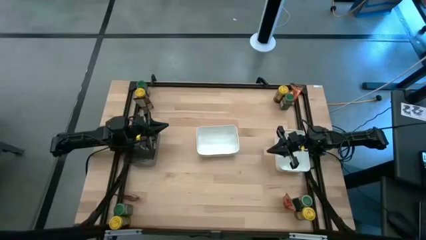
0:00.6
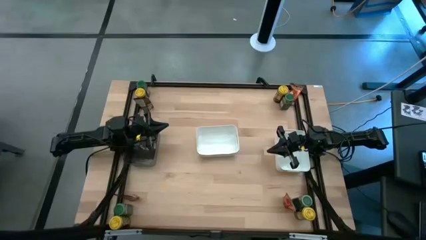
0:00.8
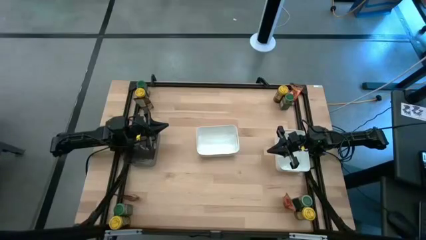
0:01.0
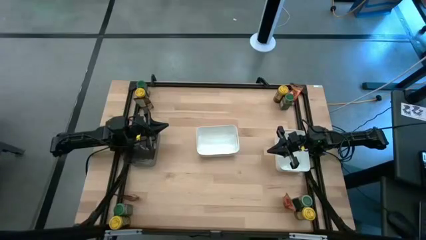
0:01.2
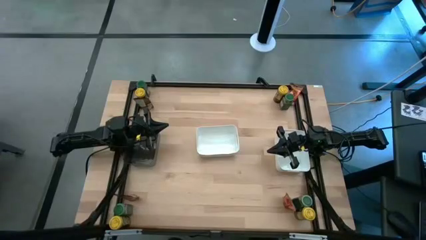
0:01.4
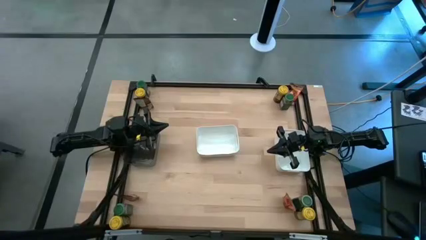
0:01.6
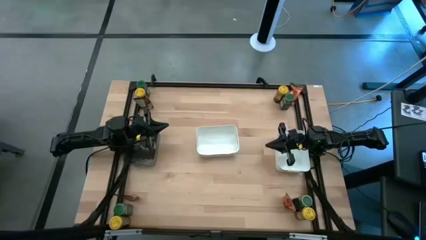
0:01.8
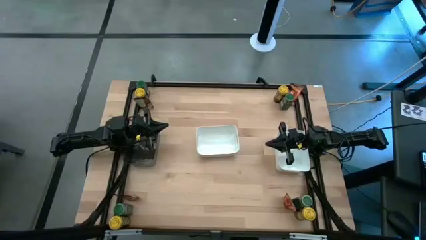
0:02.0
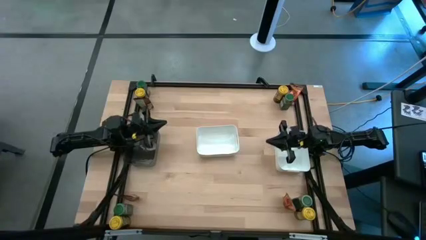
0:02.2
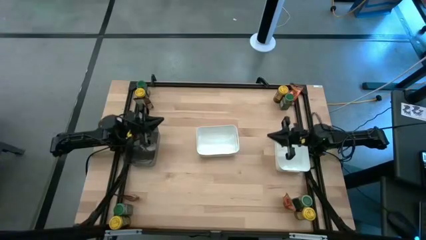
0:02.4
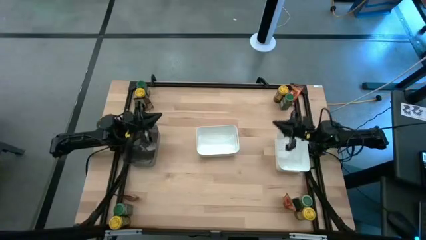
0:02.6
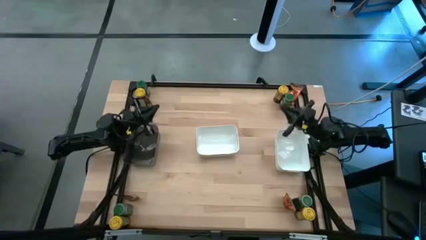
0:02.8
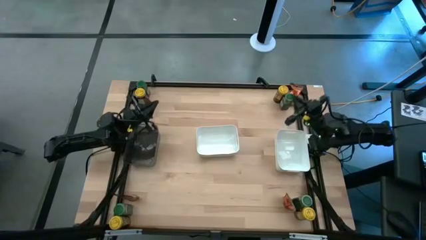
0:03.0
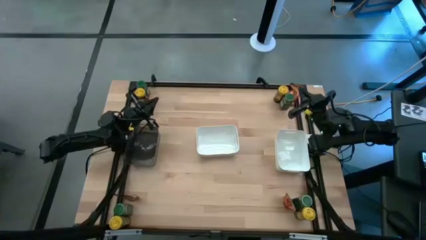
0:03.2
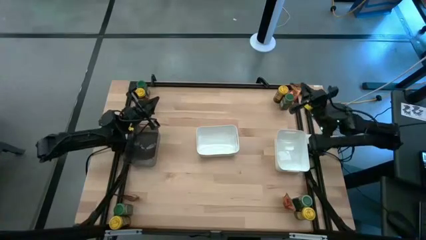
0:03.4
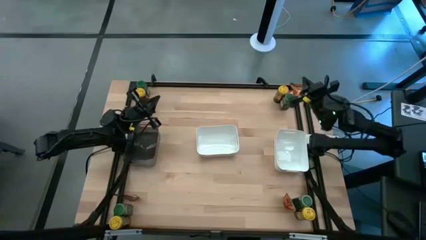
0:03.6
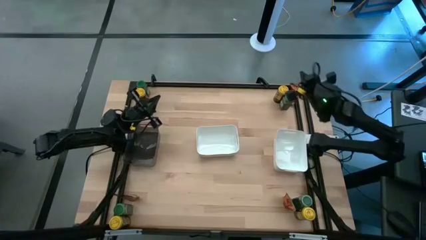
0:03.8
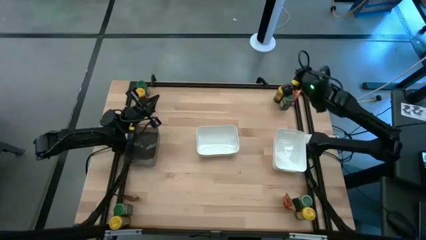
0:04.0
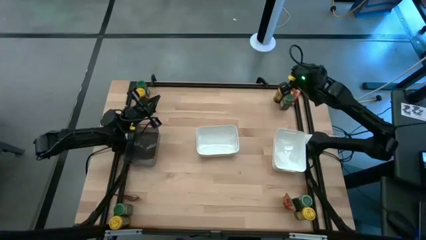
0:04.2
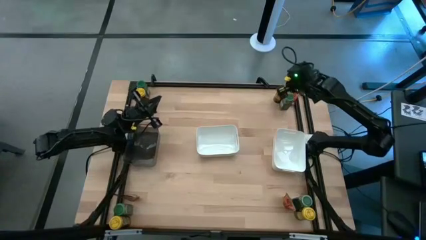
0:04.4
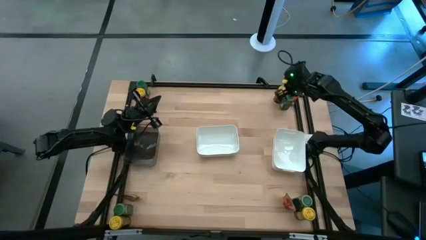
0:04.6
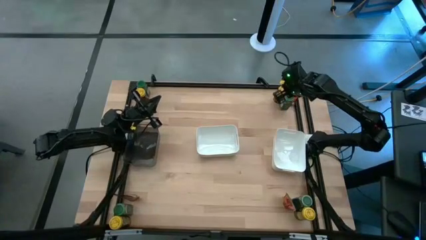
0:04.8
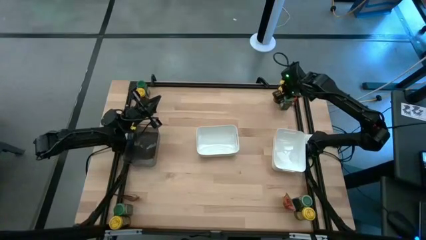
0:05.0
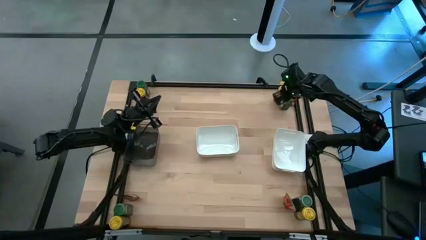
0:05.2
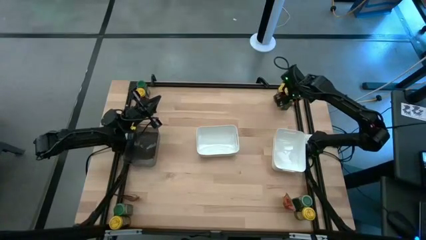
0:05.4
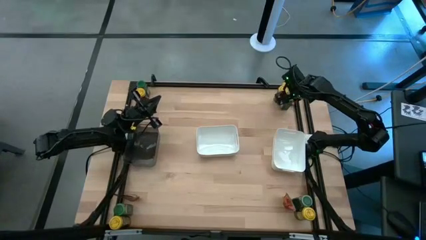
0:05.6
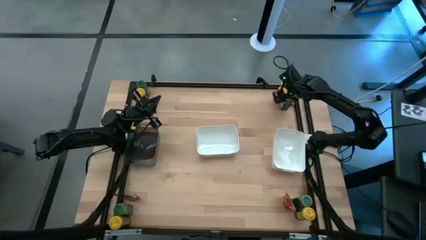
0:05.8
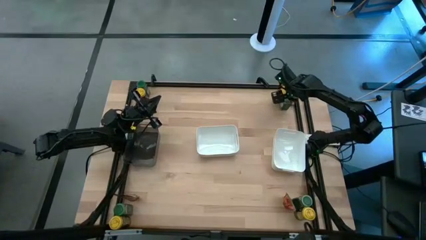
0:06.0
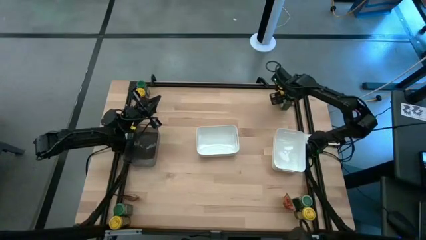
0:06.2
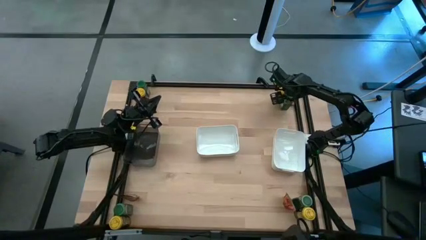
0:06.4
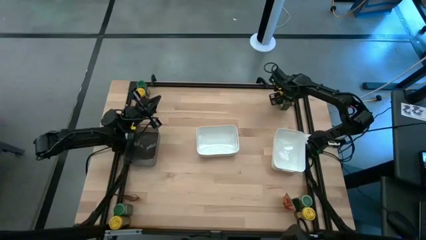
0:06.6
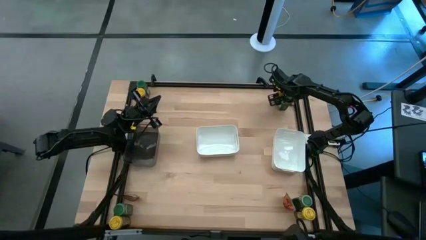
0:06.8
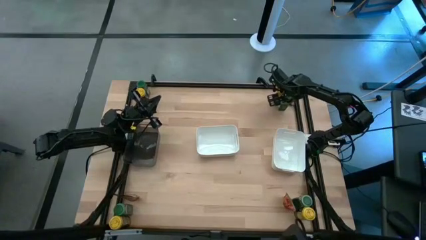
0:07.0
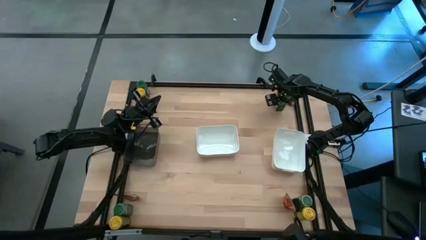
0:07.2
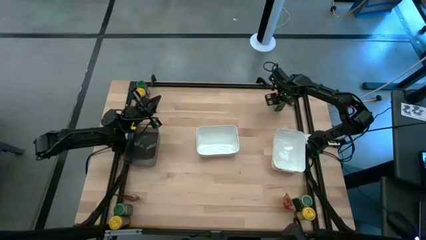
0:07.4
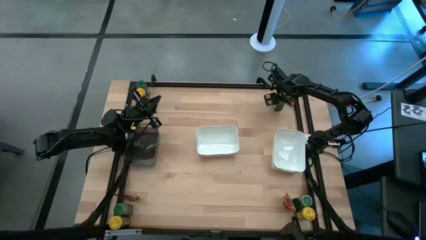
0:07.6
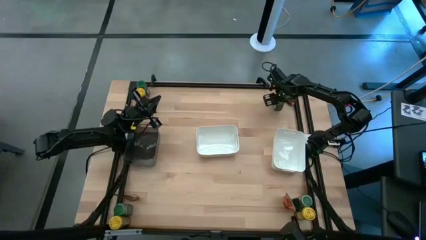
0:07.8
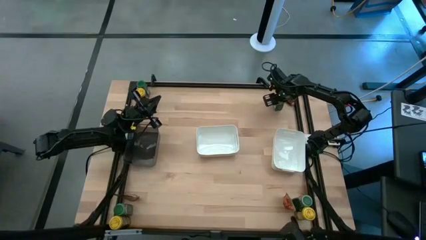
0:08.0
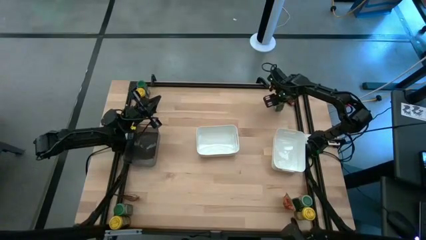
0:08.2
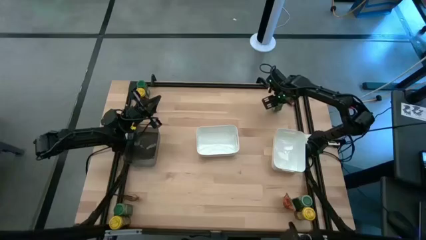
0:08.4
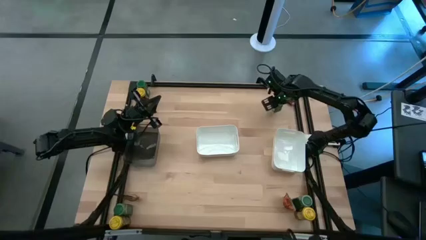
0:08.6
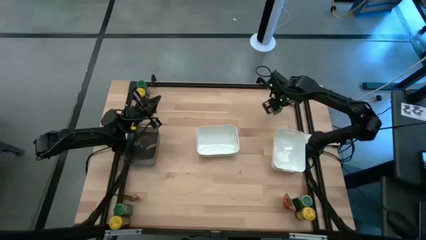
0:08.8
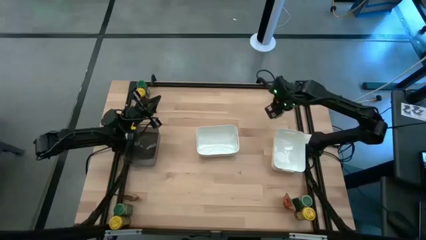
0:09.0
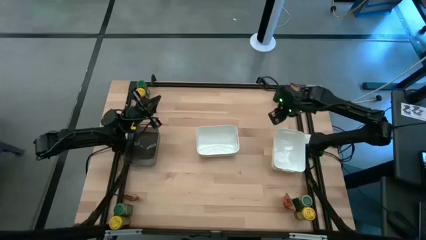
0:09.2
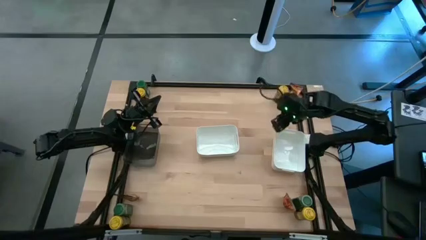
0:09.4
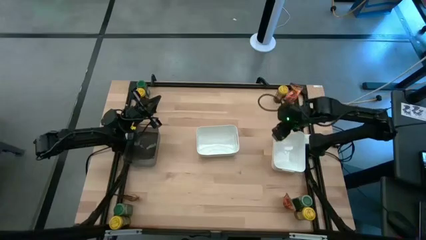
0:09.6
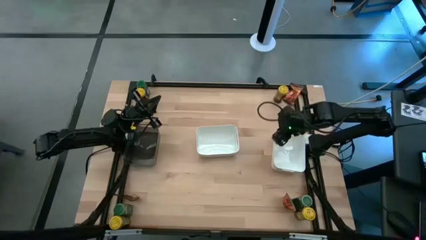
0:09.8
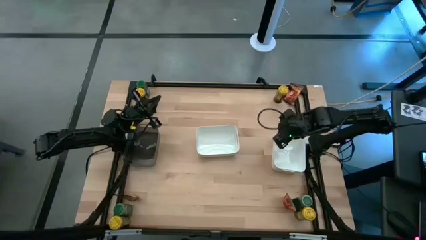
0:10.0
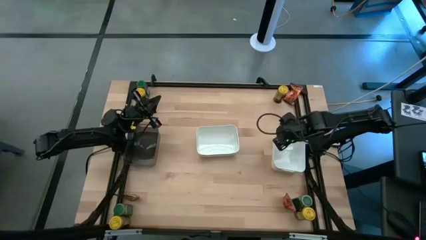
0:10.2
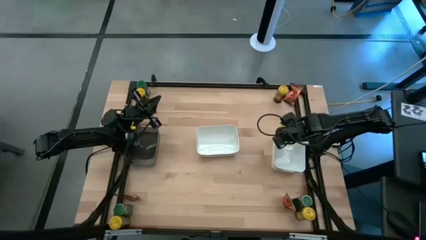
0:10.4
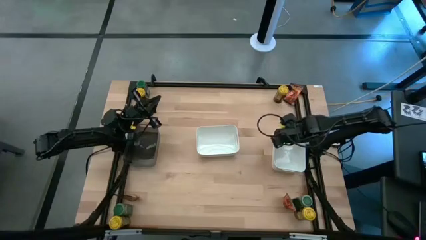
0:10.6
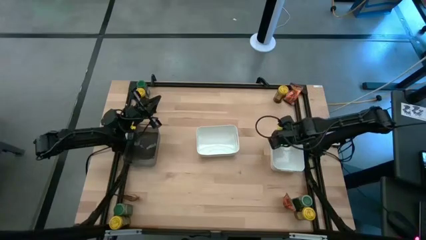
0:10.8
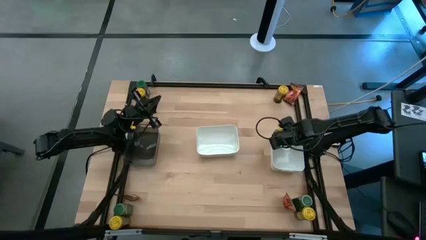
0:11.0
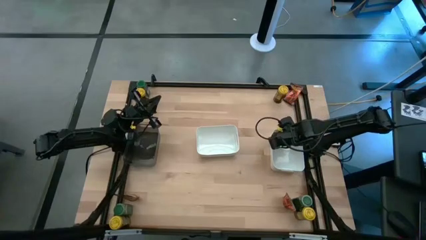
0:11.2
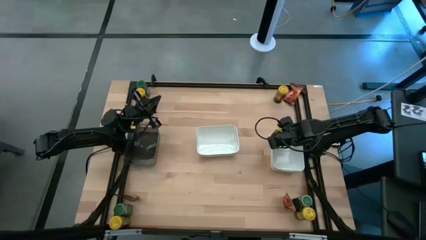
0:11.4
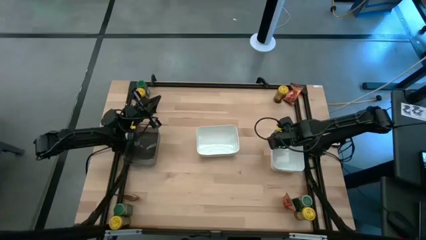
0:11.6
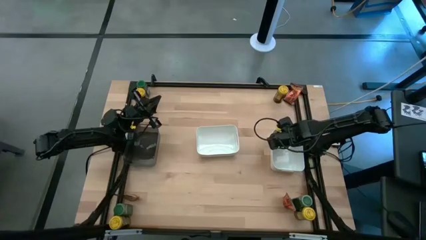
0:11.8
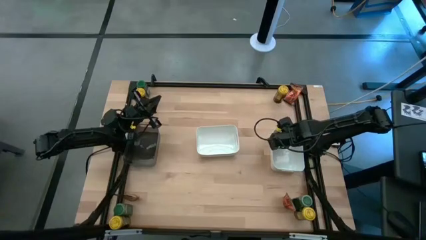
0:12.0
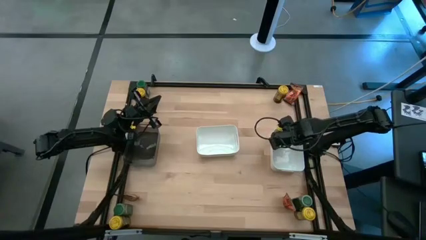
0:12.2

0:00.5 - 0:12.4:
Task: Sort spices by type
Put the top right green seasoning bottle into the right white bin

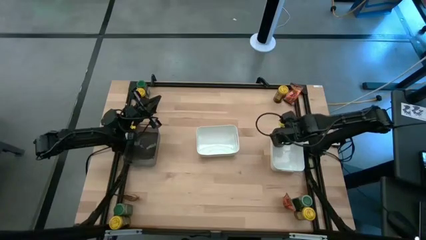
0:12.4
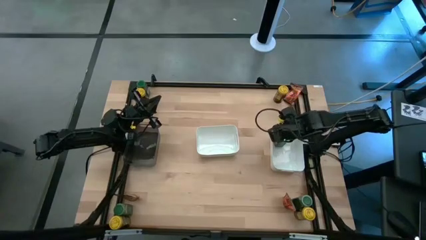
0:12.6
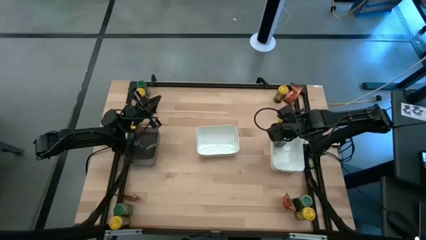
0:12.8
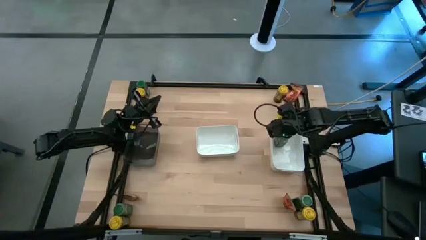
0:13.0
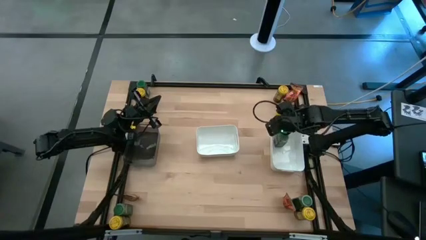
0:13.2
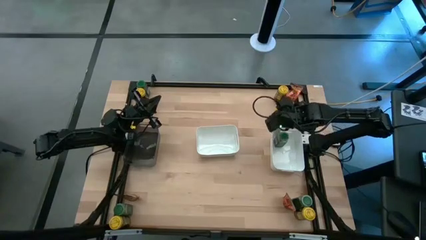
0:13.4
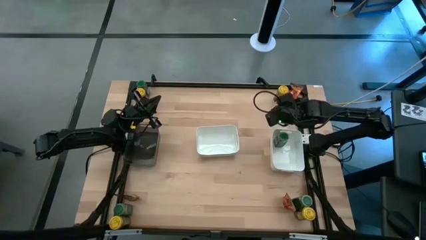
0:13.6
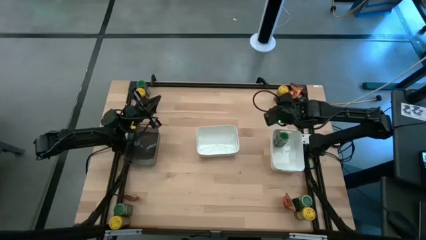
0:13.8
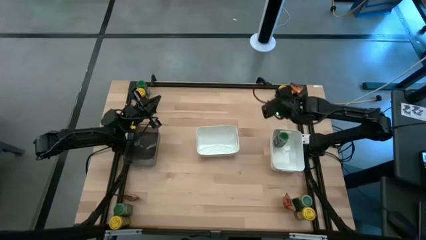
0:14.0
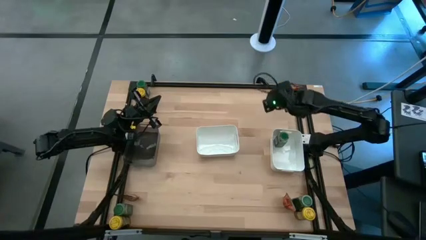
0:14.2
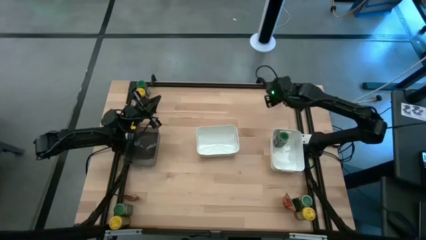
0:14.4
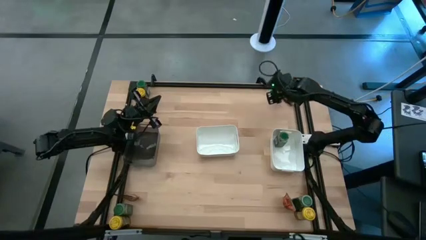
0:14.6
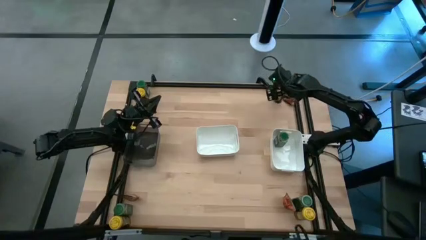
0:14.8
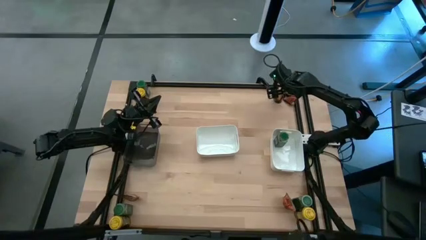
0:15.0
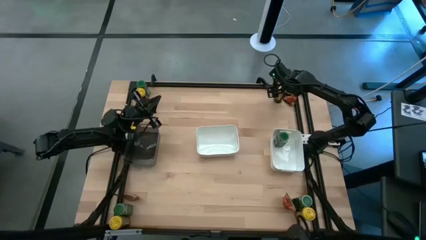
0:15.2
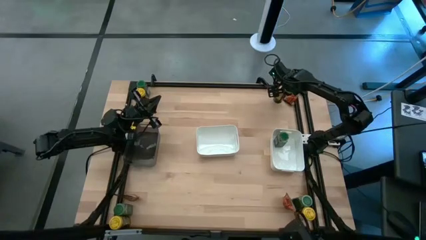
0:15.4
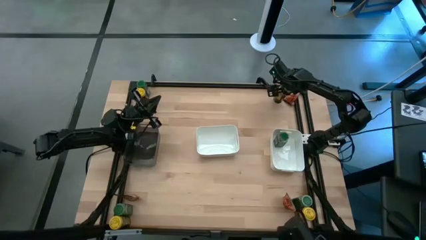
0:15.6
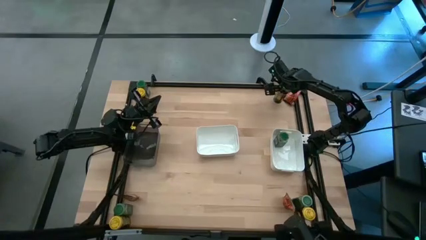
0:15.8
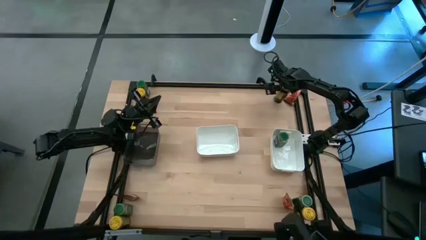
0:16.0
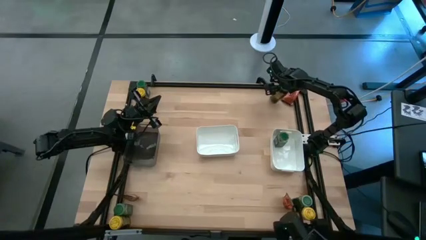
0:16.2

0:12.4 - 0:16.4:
Put the top right yellow seasoning bottle into the left white bin
